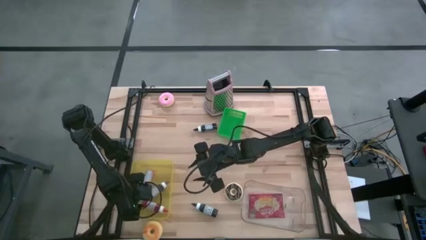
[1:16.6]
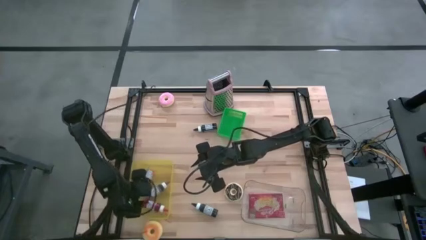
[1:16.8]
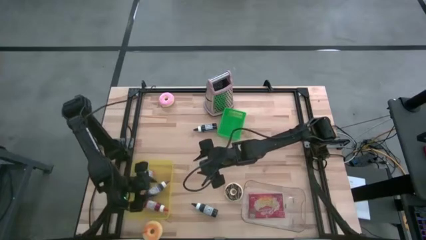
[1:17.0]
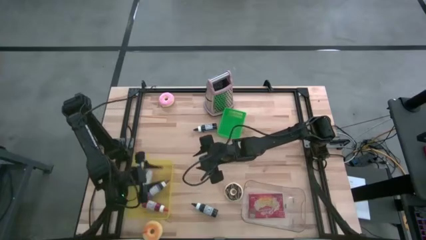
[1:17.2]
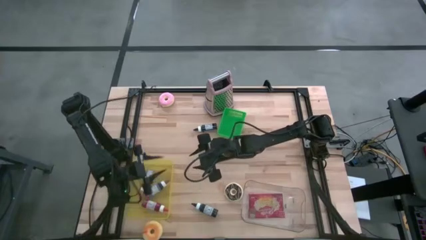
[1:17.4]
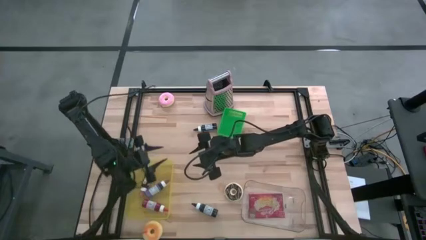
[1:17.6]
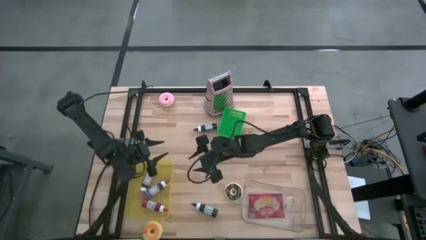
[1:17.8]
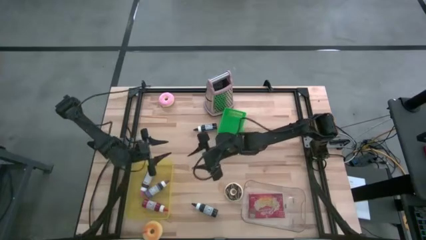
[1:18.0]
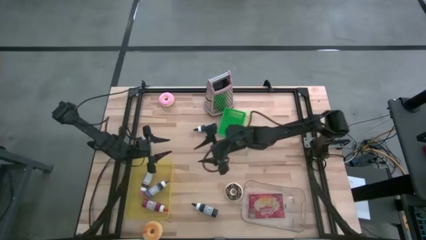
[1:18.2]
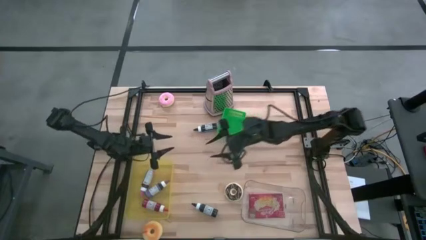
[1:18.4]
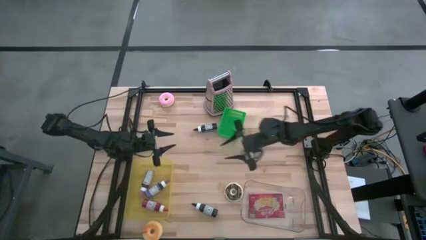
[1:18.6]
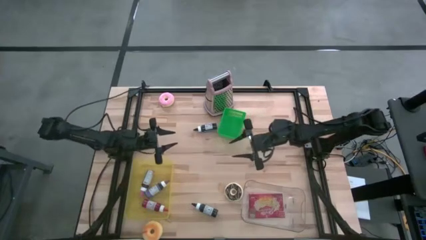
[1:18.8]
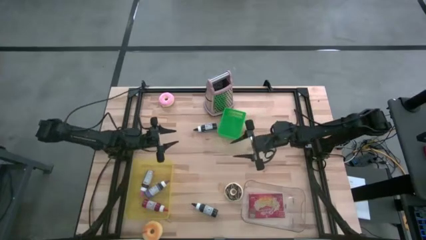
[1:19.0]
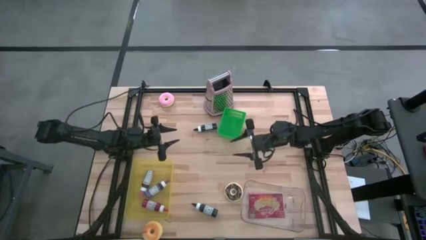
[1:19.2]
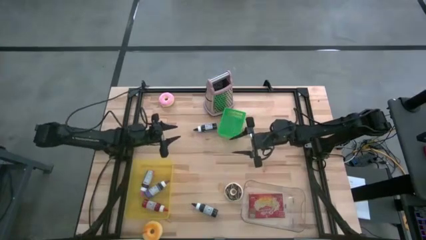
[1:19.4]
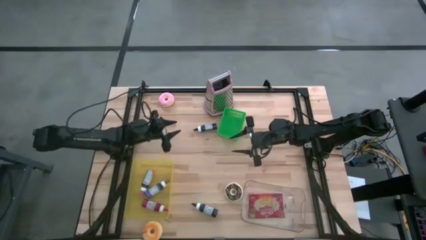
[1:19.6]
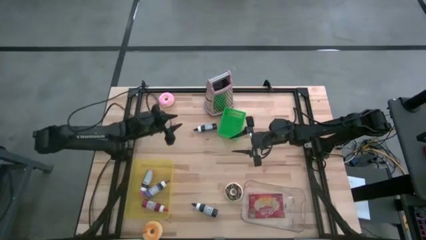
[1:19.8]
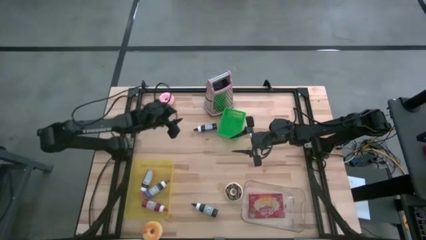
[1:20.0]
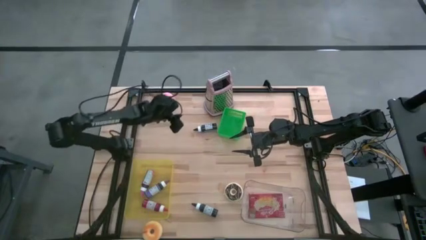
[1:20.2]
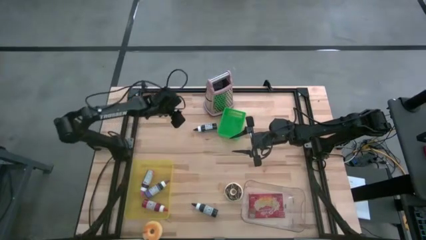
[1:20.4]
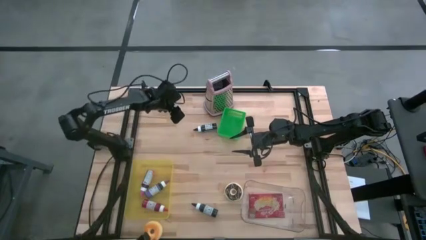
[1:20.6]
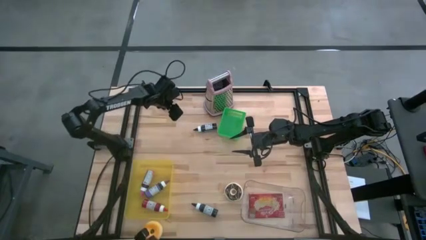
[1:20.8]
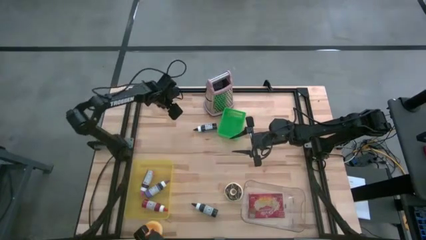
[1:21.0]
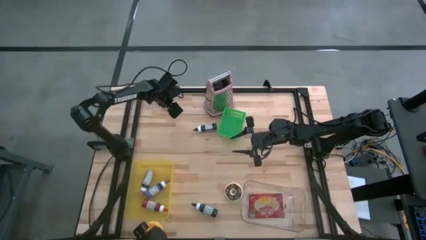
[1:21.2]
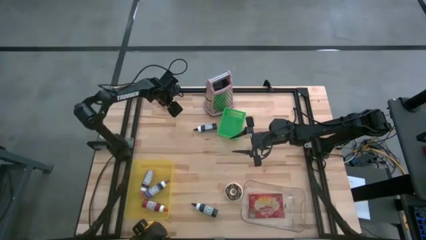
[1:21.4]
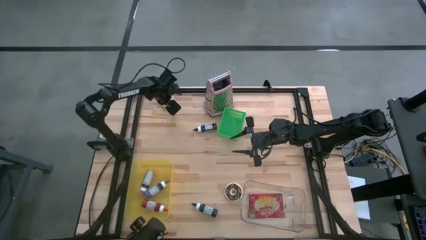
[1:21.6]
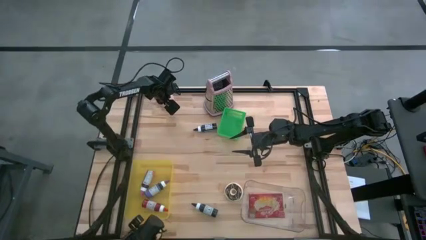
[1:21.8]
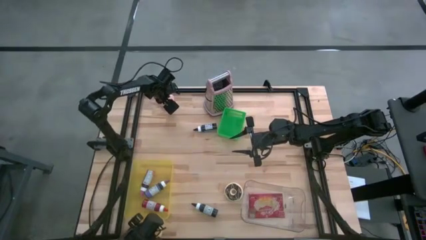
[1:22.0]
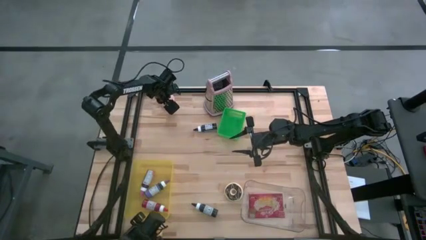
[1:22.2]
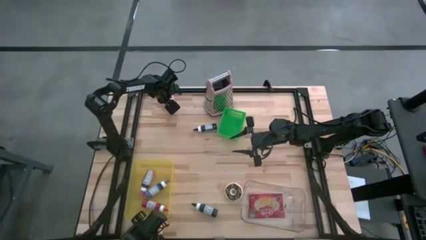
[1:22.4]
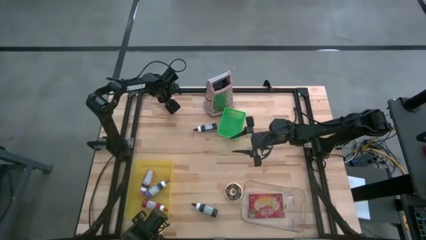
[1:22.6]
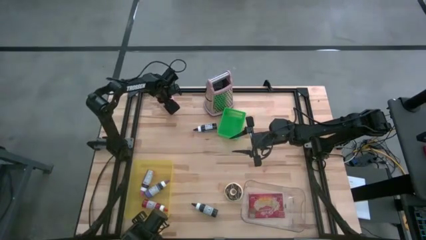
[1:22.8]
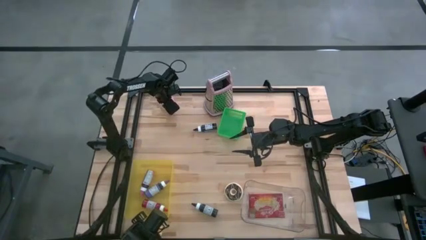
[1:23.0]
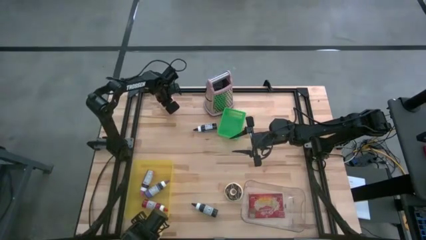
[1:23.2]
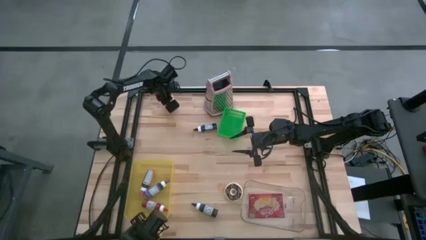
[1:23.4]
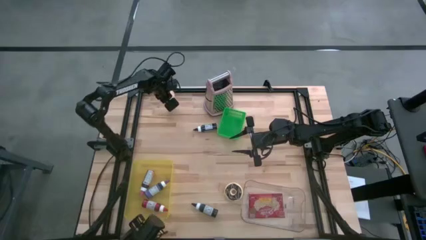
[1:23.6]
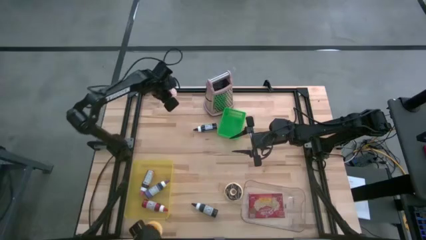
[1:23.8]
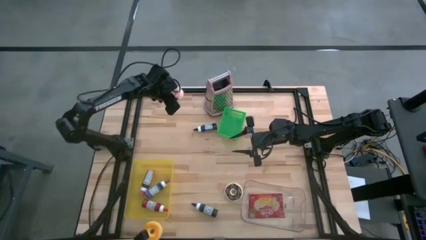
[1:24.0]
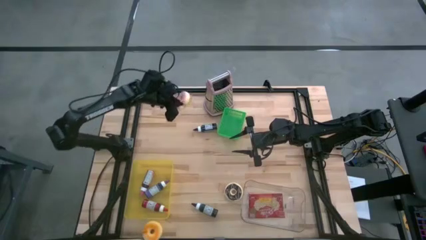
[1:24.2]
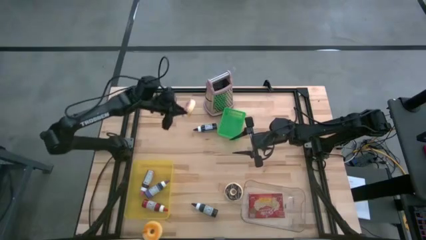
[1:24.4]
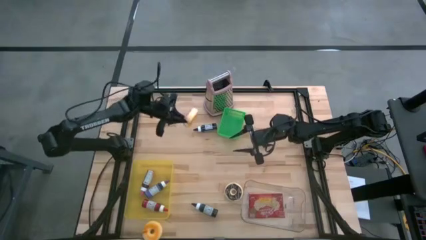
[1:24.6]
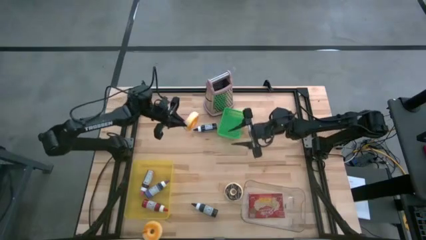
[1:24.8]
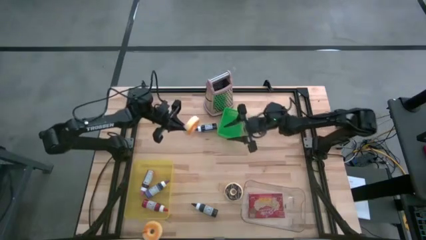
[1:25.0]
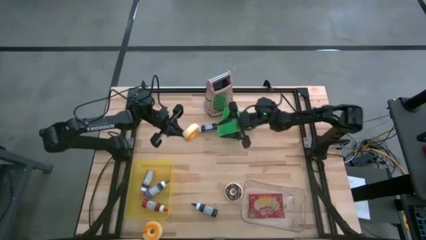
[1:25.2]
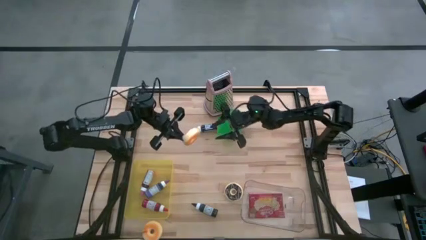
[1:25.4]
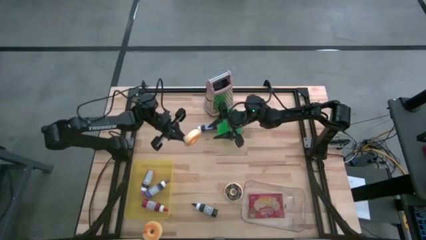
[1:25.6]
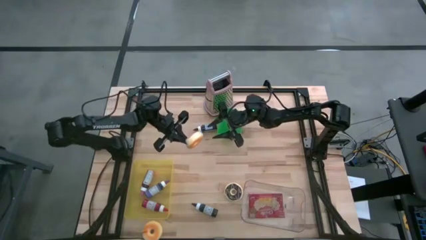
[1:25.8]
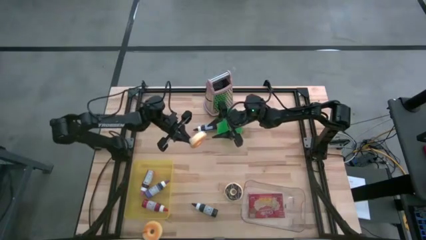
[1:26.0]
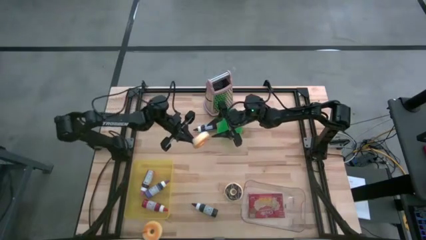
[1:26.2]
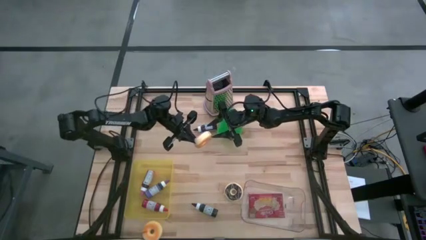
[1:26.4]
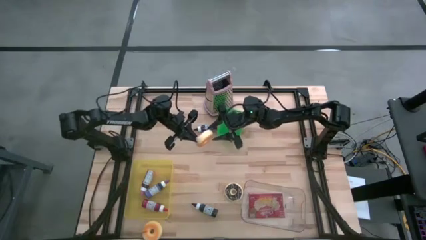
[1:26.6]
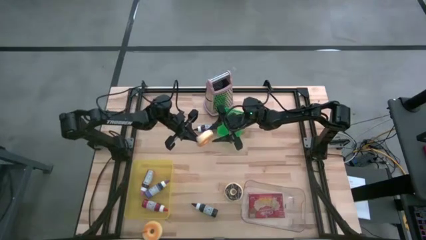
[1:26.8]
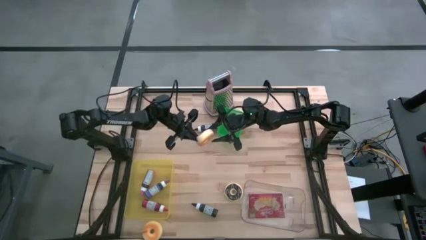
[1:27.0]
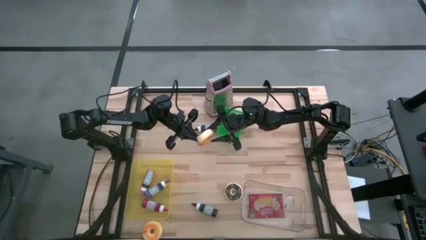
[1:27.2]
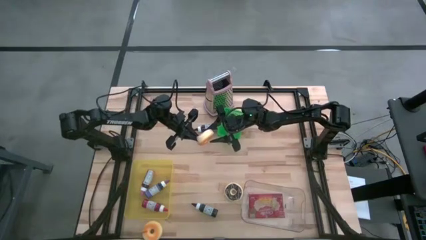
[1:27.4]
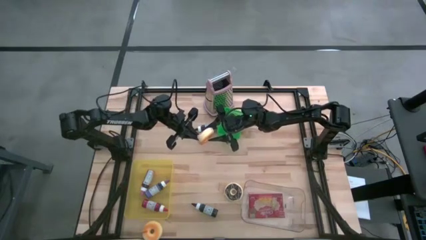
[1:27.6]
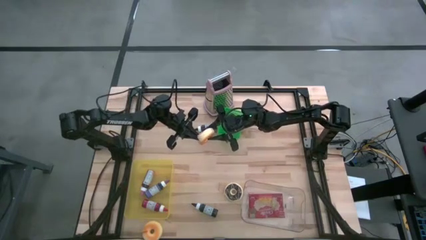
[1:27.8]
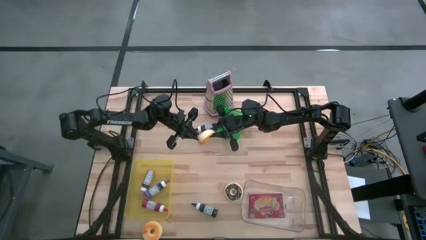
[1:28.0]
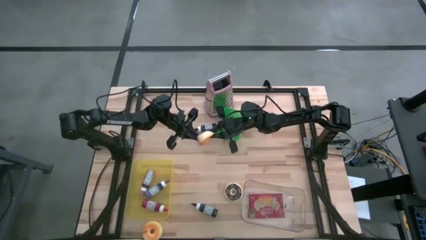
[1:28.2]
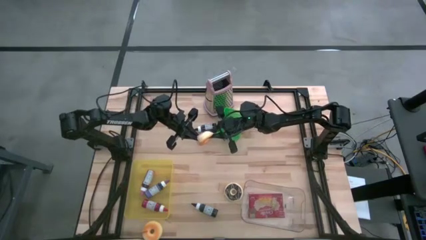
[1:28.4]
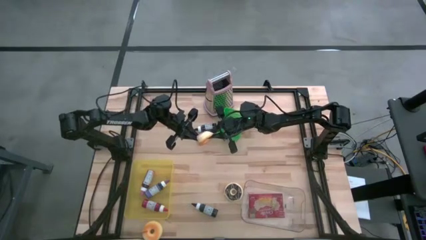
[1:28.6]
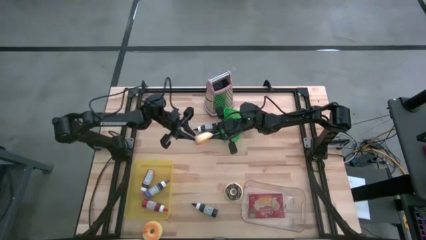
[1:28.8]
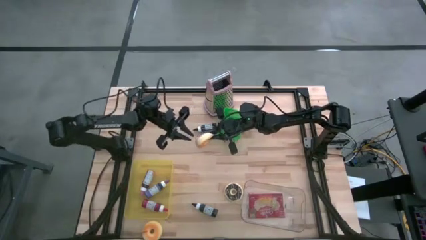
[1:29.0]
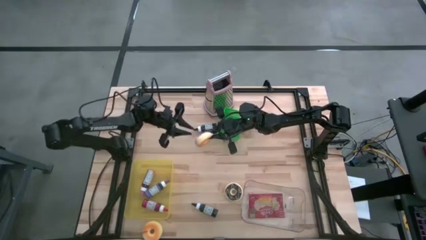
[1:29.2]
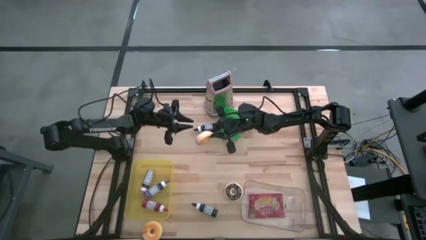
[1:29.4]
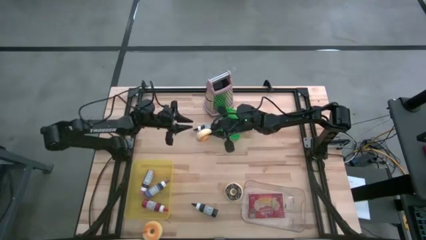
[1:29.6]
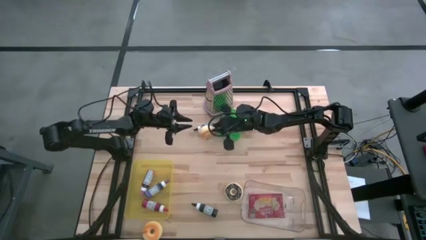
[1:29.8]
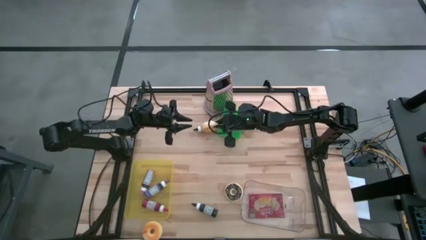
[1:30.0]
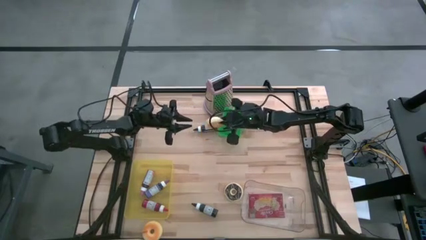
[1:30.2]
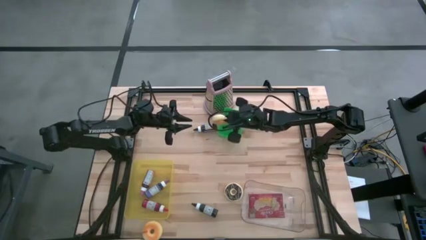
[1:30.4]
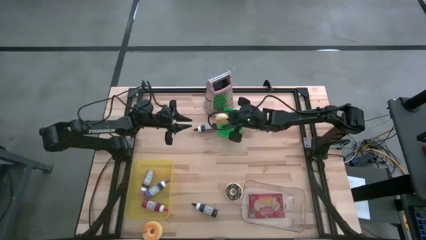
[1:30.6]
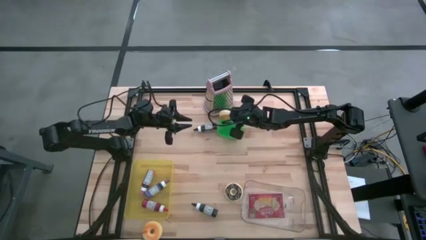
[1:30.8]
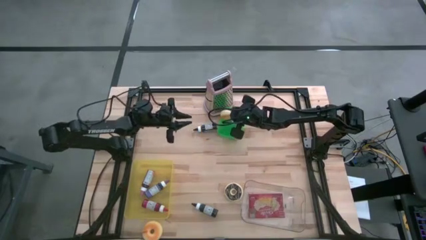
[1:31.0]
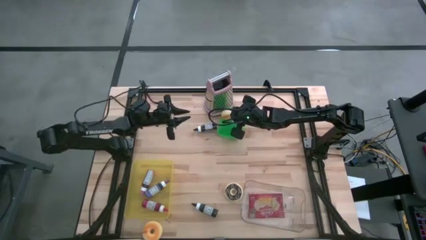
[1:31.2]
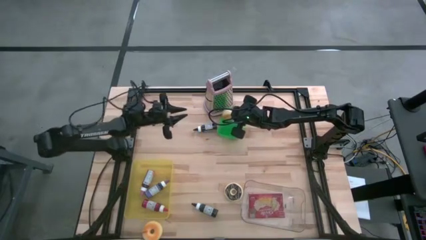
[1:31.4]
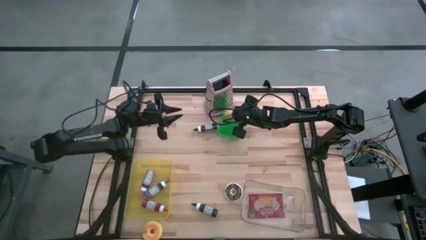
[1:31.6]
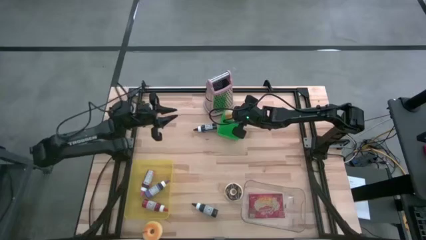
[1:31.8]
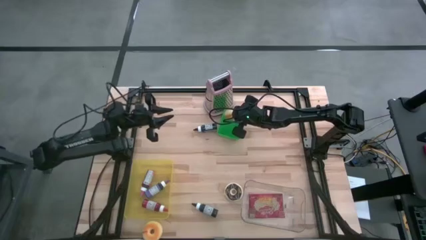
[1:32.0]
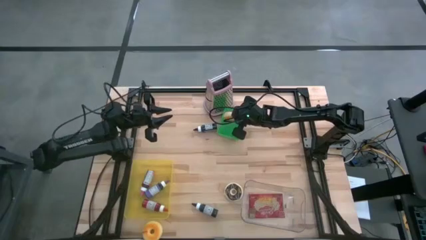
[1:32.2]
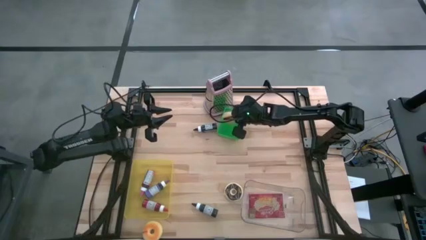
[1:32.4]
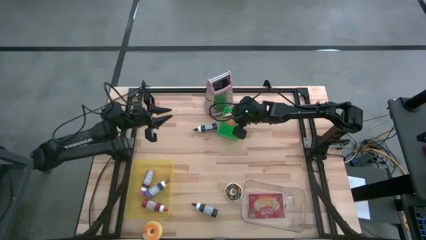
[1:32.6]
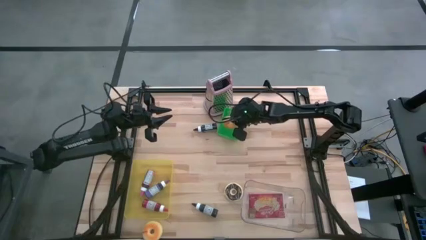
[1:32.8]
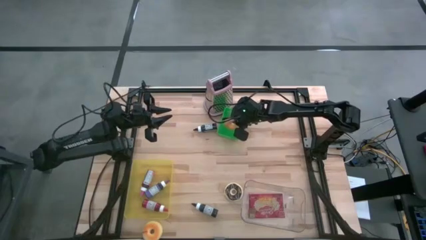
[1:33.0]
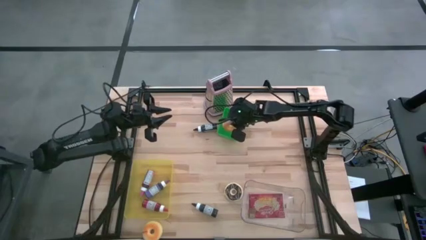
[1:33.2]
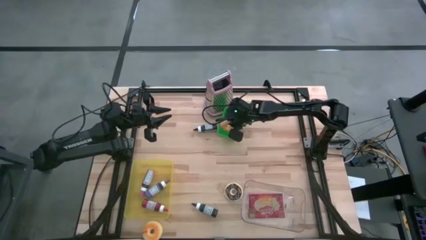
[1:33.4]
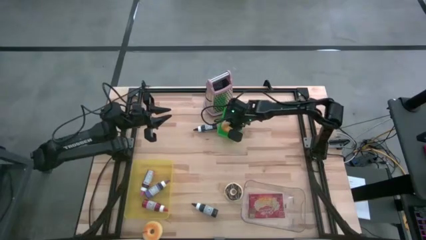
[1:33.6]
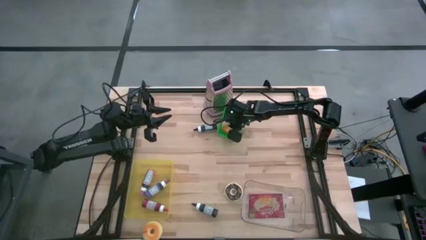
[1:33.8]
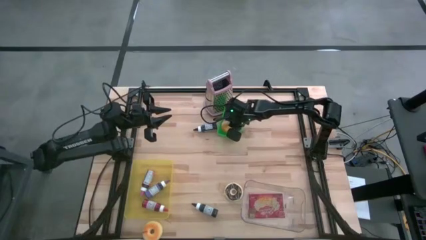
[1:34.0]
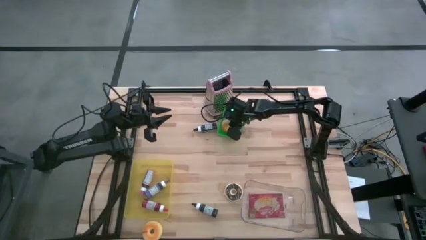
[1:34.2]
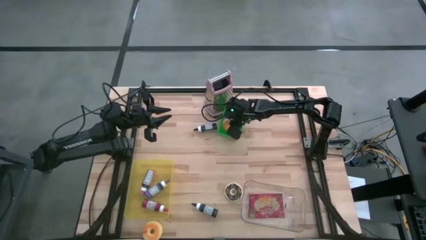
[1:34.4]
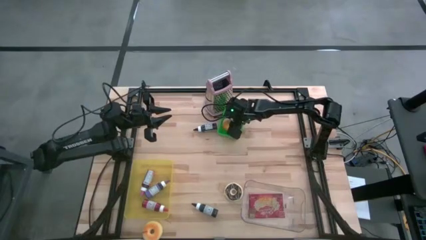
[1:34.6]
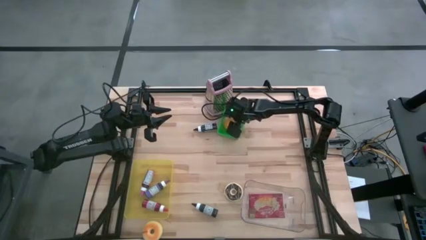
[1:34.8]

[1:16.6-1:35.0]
Task: Pick & Place Food Item
Put the pink donut into the green bin
